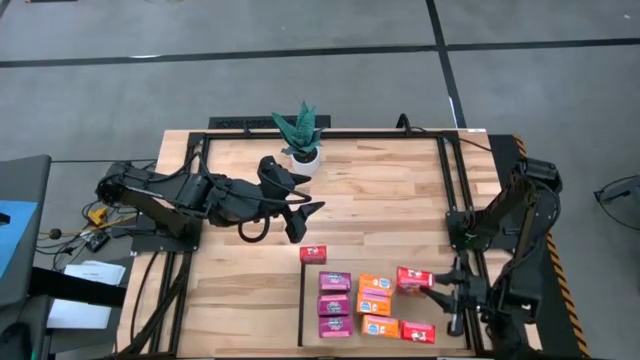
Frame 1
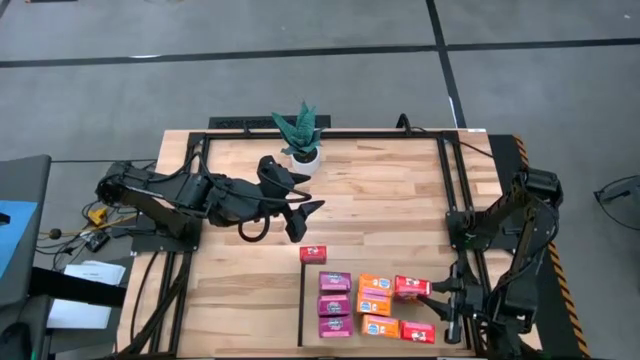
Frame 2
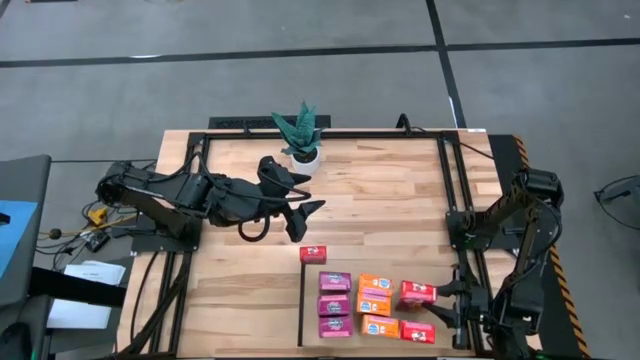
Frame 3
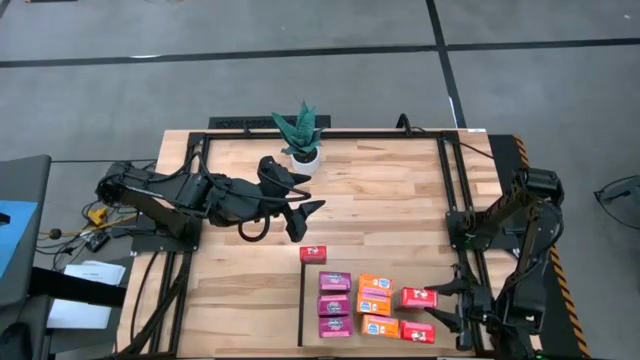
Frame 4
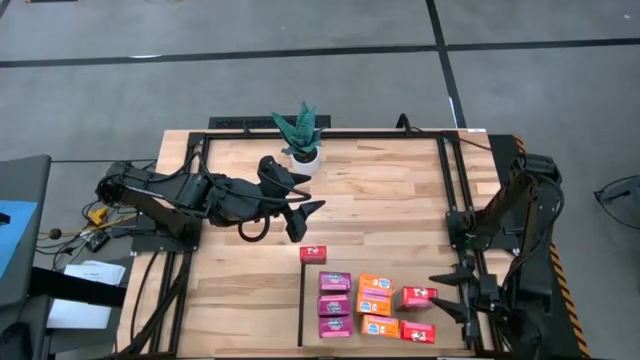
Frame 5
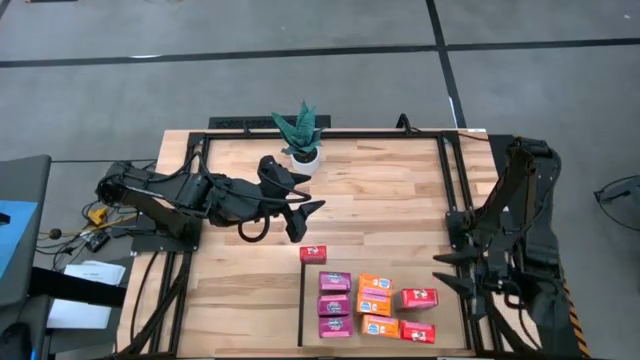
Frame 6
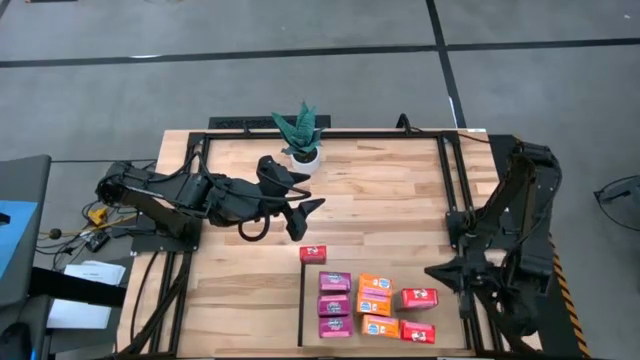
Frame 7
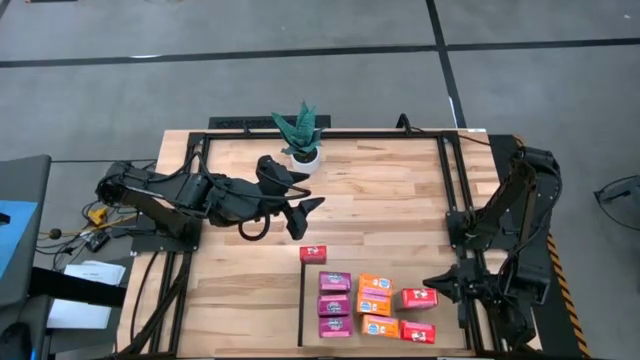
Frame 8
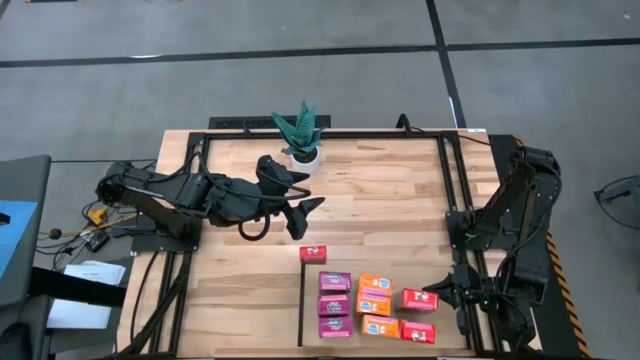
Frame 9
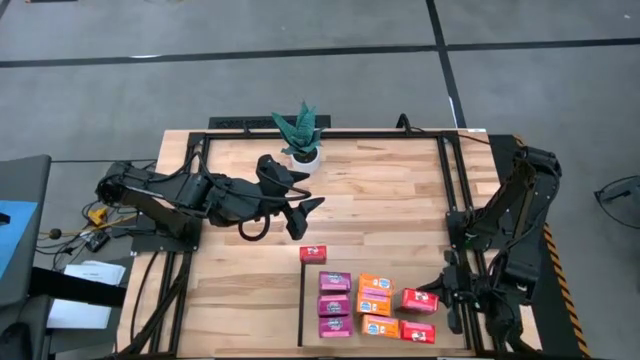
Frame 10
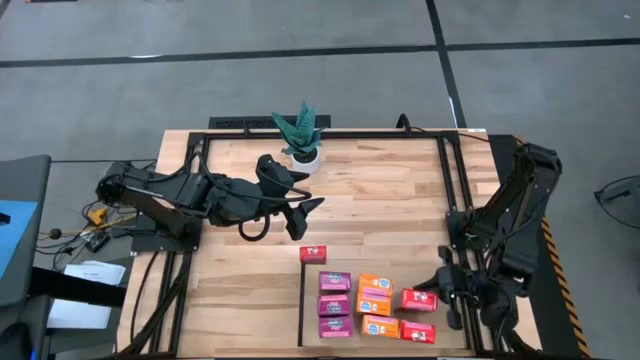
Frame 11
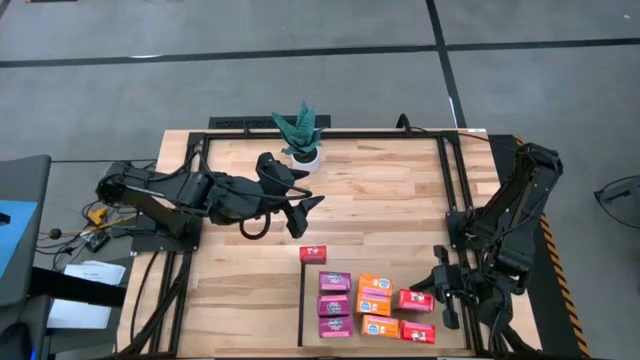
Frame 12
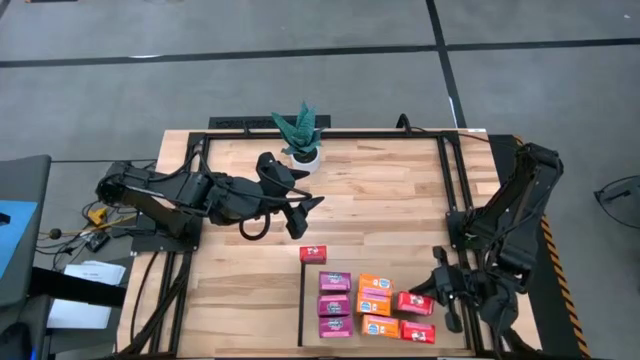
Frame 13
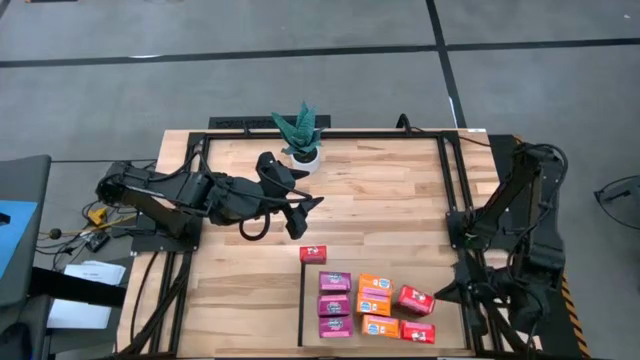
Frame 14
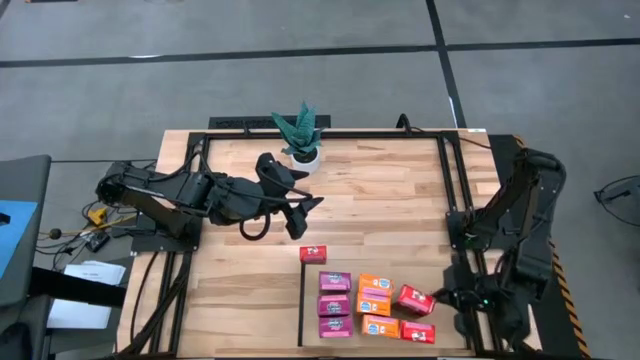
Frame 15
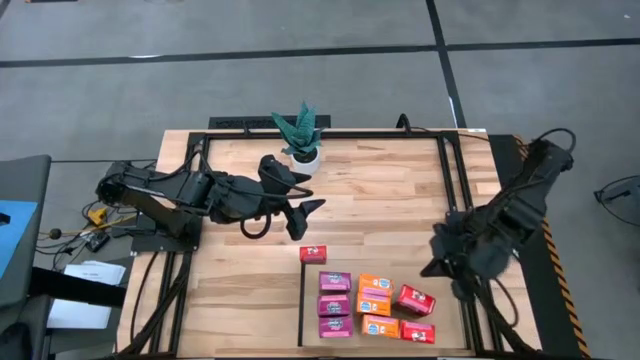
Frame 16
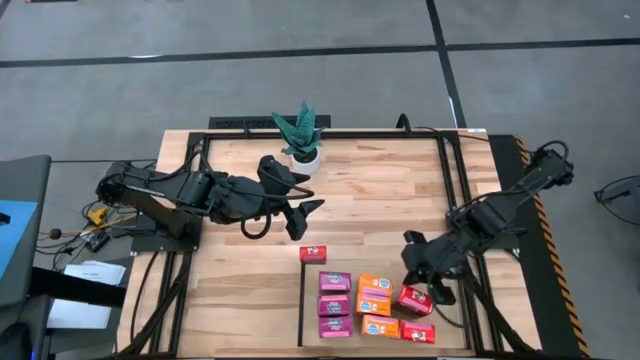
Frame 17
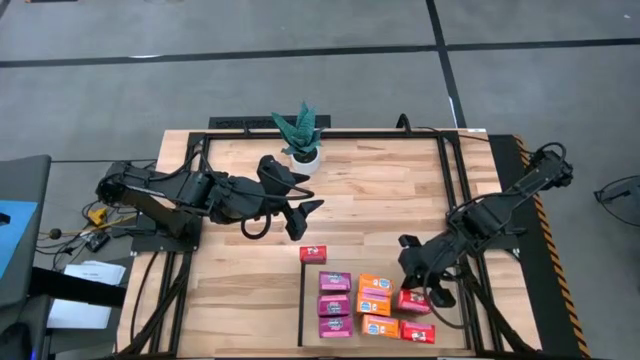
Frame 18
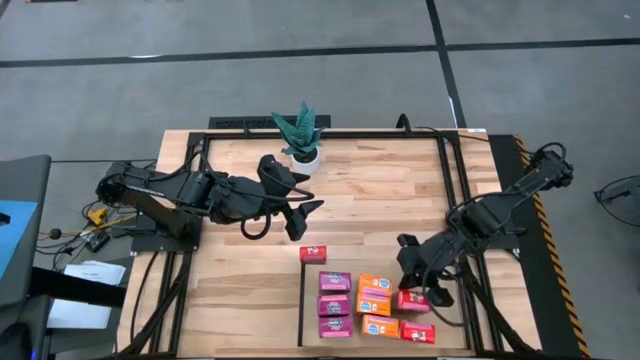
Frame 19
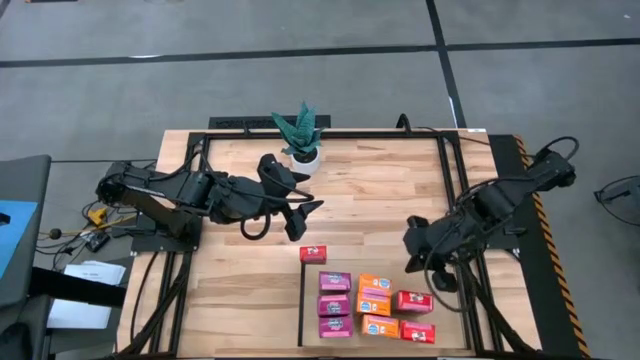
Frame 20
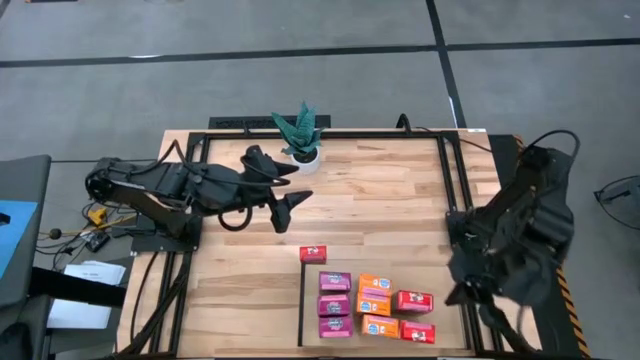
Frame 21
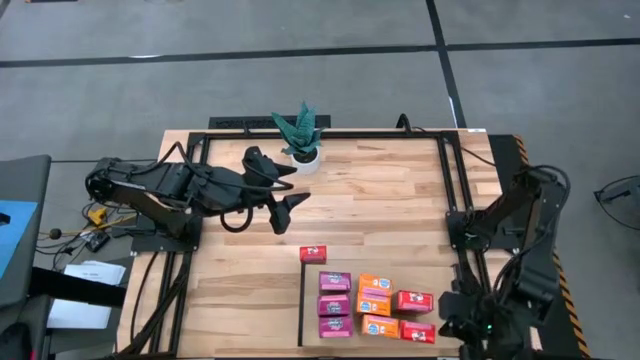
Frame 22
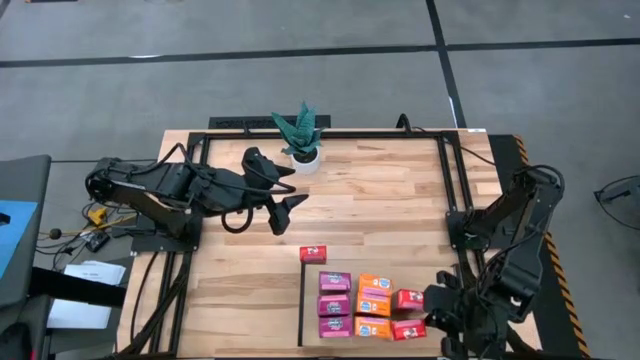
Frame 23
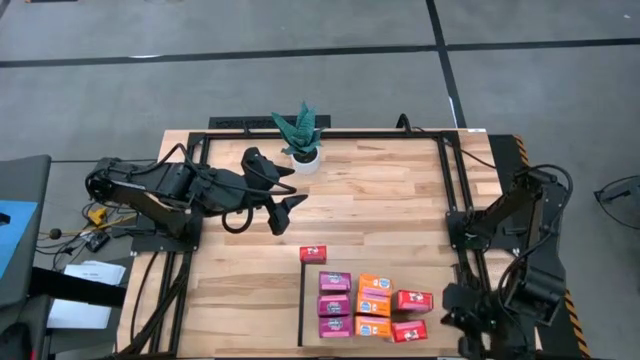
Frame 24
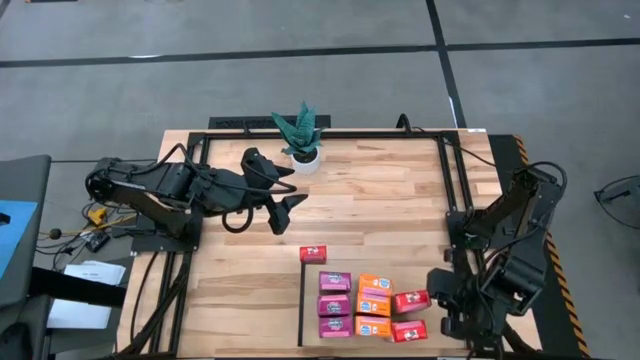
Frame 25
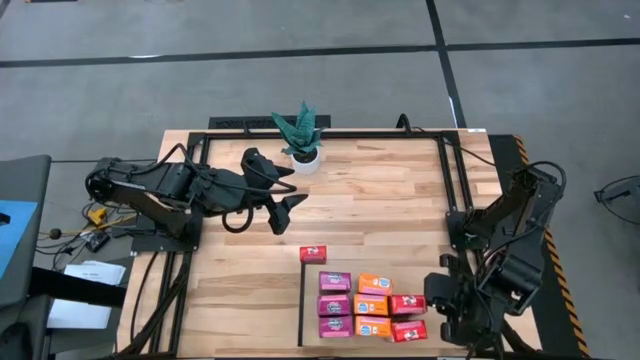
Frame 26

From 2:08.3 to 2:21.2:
Task: Stack cereal on shelf
Put the red cereal box on the middle right shelf

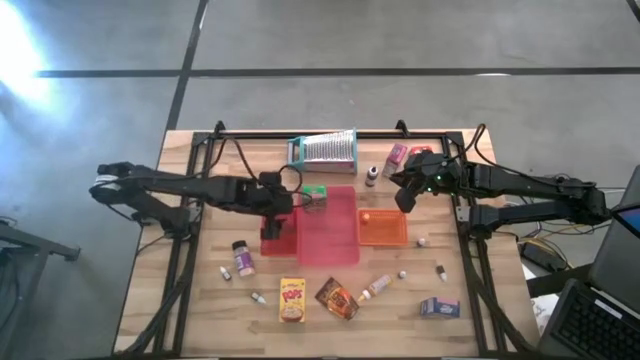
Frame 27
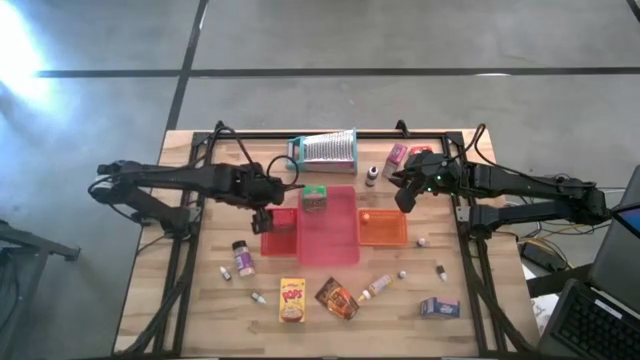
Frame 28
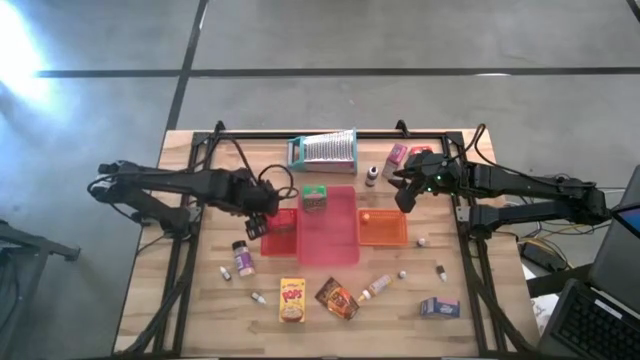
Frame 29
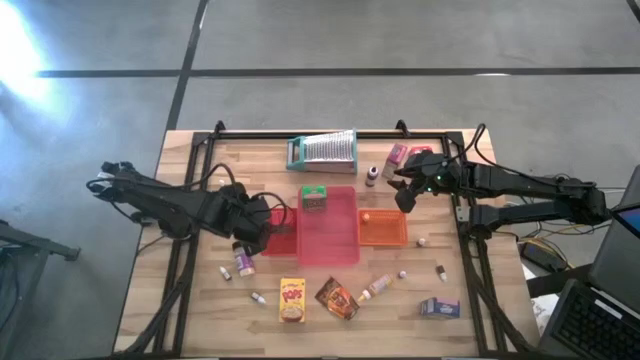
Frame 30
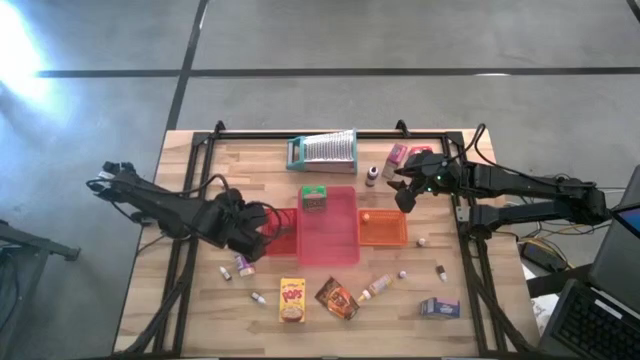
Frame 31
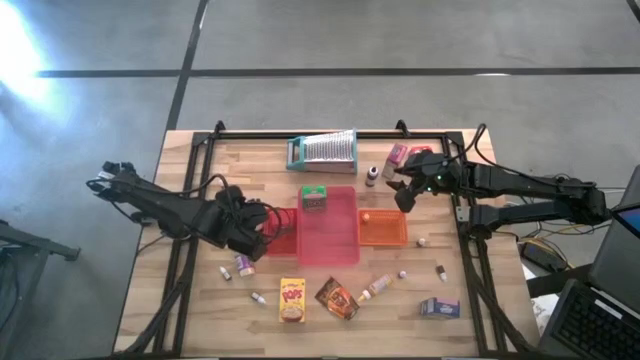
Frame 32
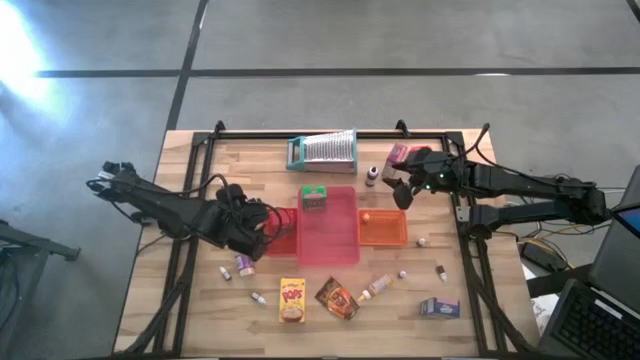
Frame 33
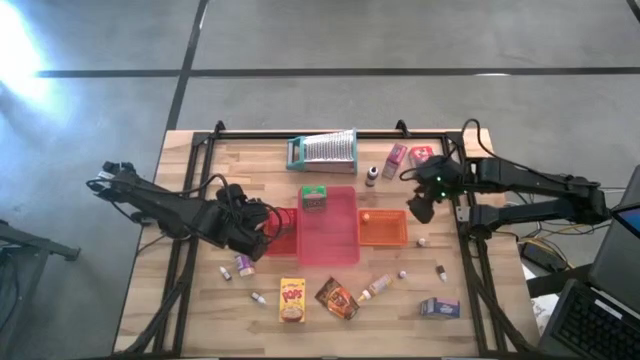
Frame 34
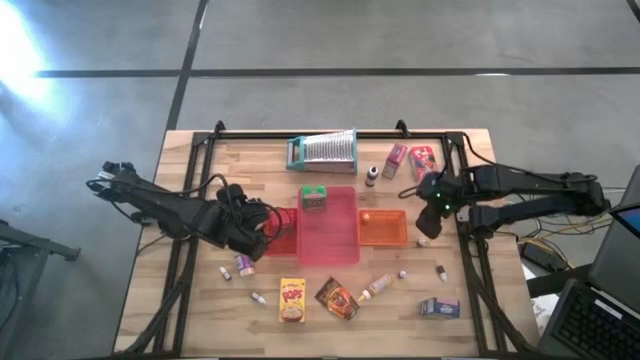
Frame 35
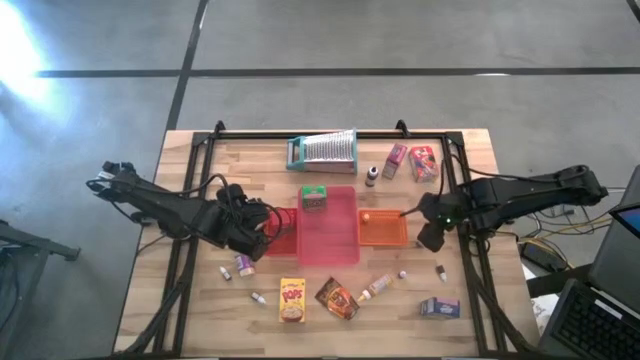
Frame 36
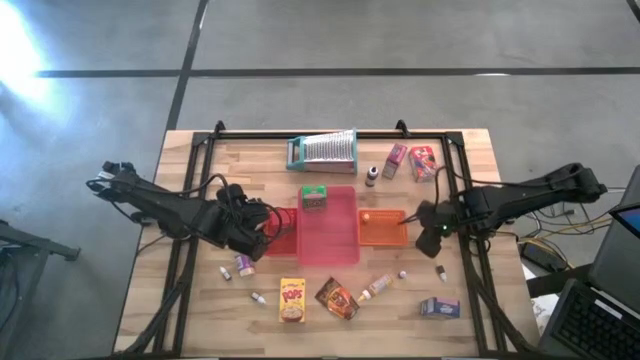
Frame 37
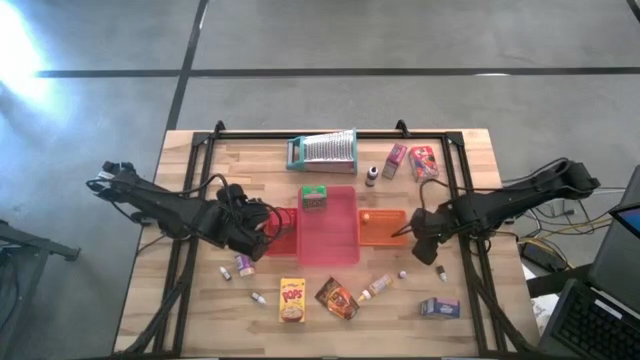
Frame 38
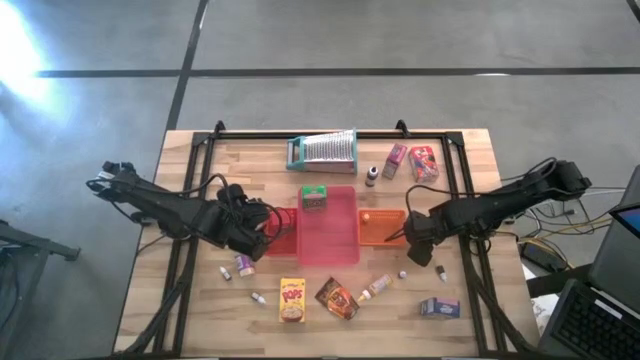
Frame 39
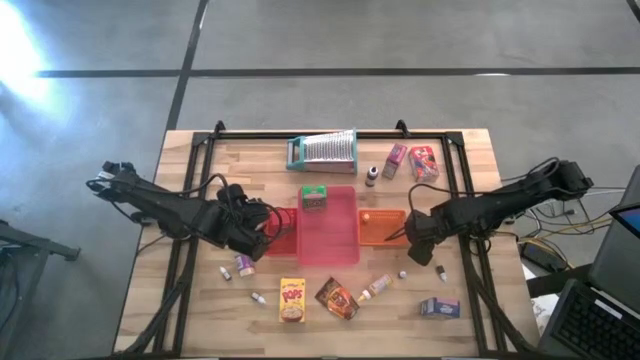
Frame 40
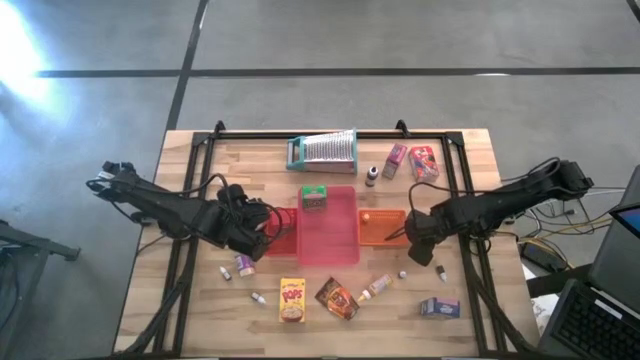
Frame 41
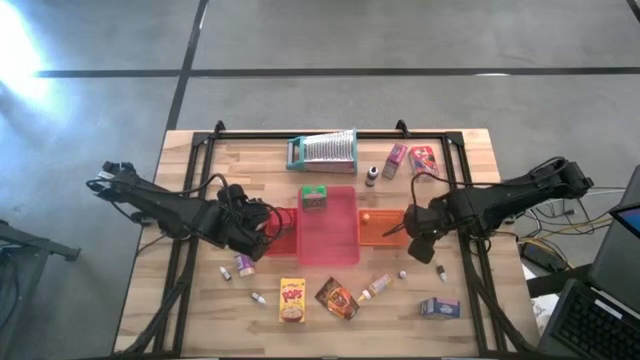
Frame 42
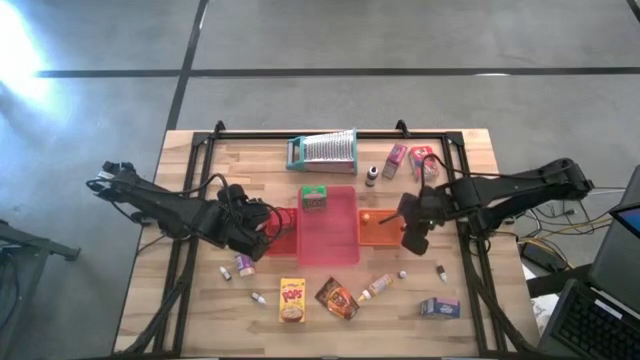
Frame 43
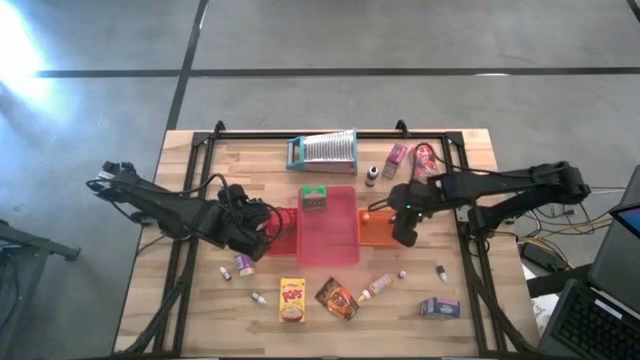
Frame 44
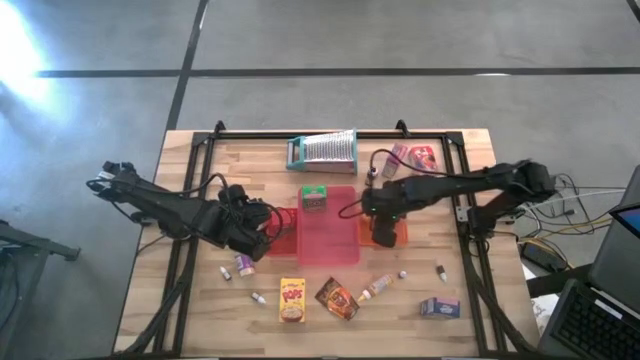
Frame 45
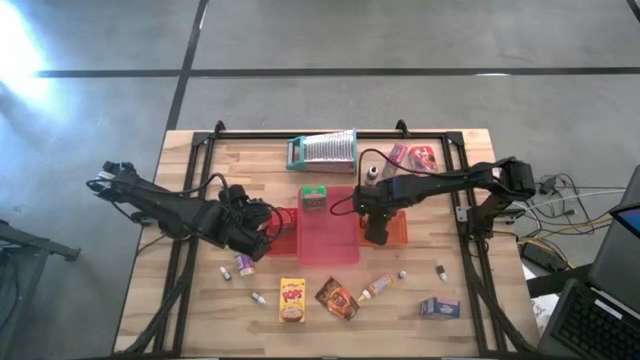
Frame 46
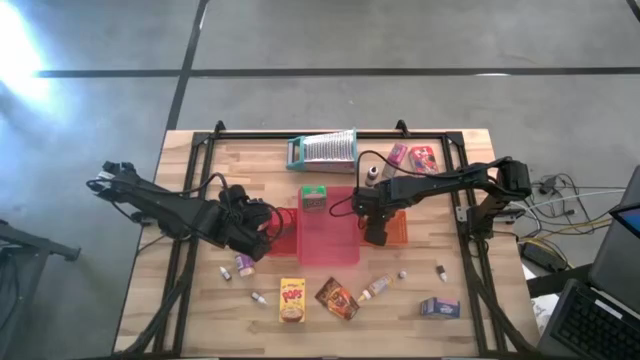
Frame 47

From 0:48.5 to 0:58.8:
Task: Pick & Place Kitchen Items
Put the small black food coloring bottle into the orange bin
